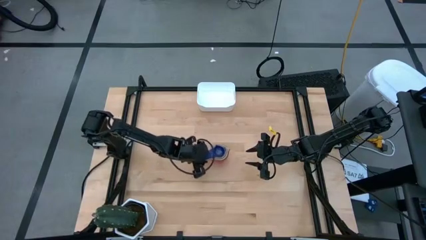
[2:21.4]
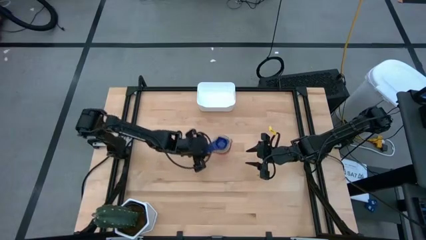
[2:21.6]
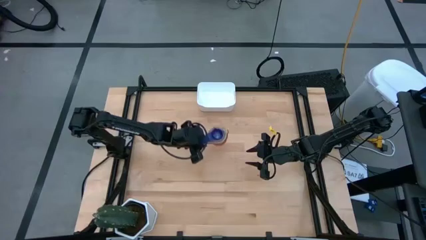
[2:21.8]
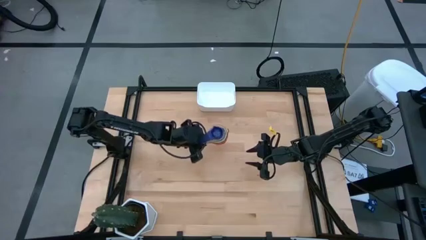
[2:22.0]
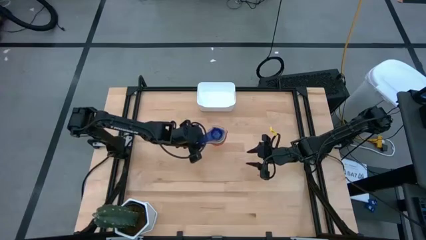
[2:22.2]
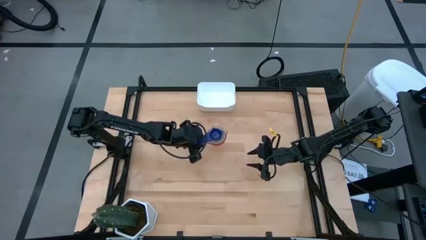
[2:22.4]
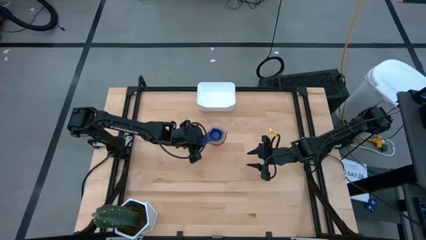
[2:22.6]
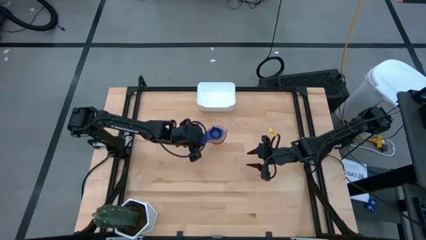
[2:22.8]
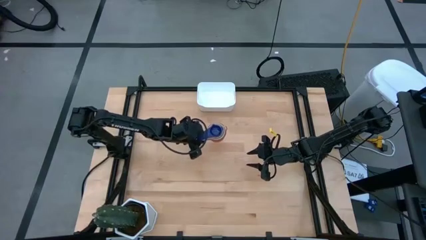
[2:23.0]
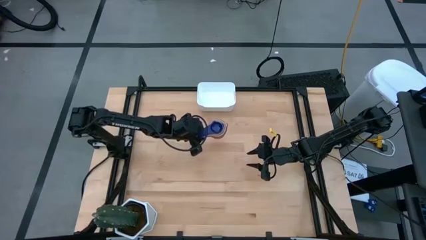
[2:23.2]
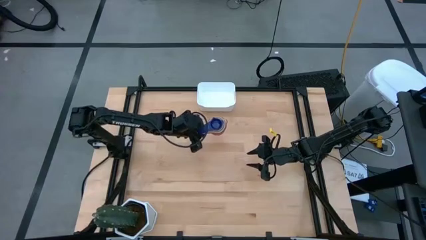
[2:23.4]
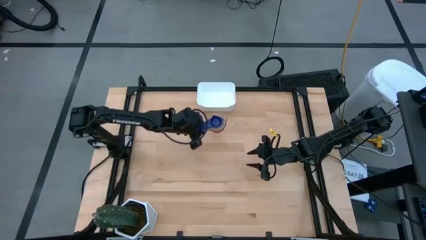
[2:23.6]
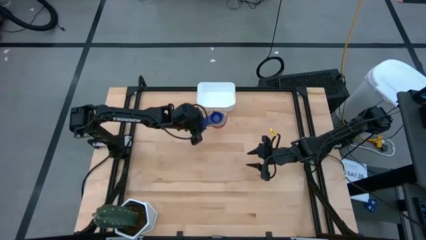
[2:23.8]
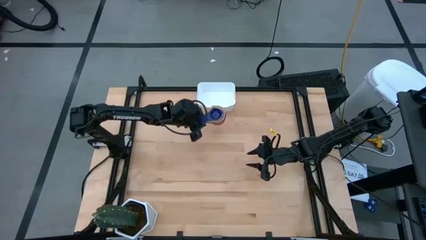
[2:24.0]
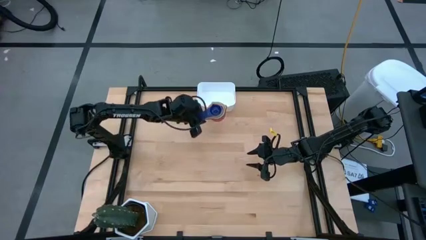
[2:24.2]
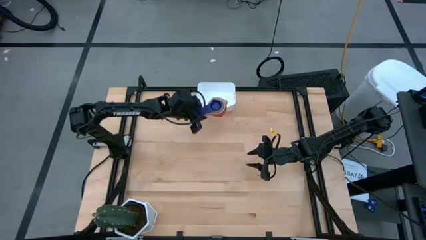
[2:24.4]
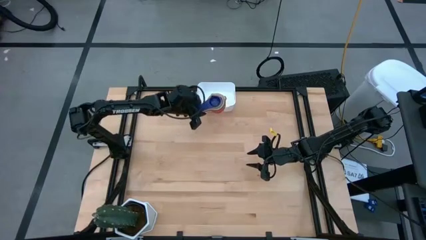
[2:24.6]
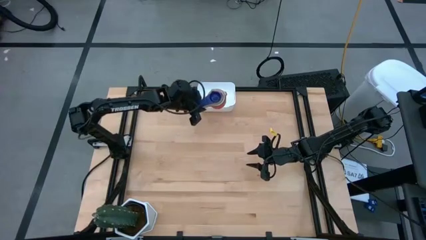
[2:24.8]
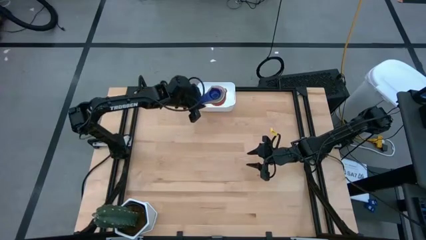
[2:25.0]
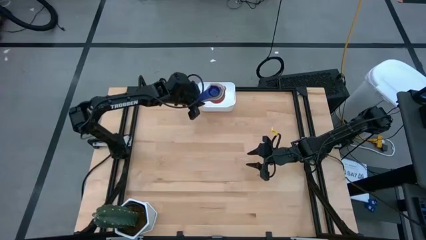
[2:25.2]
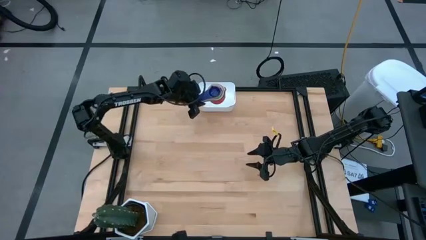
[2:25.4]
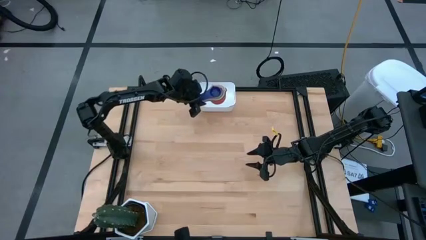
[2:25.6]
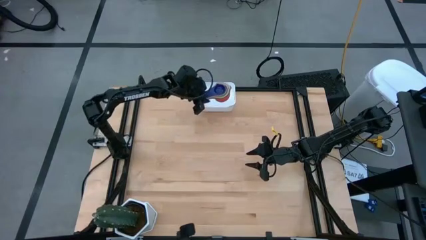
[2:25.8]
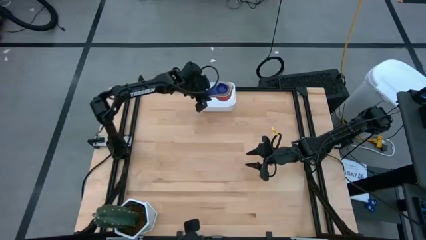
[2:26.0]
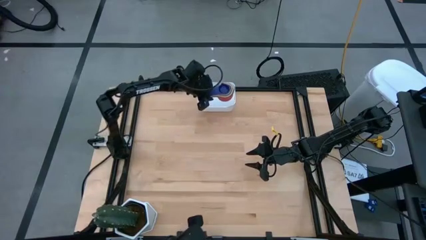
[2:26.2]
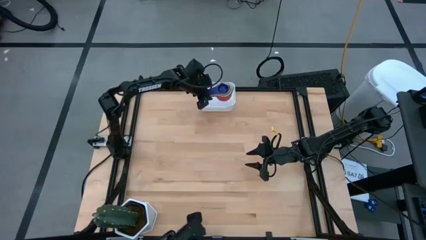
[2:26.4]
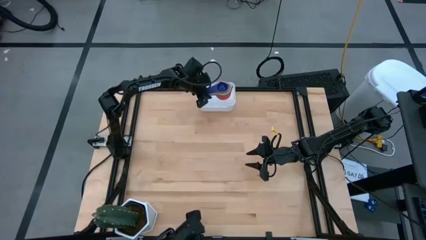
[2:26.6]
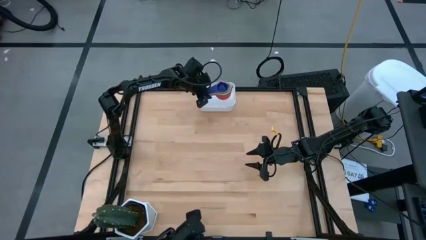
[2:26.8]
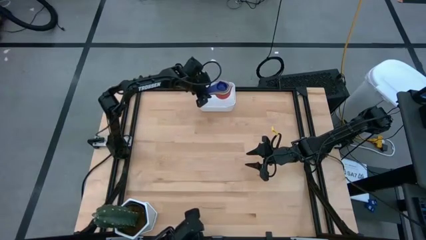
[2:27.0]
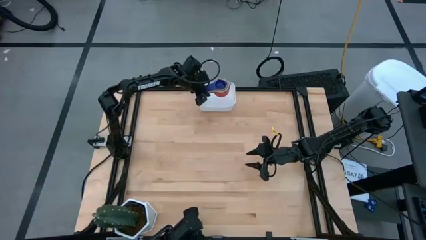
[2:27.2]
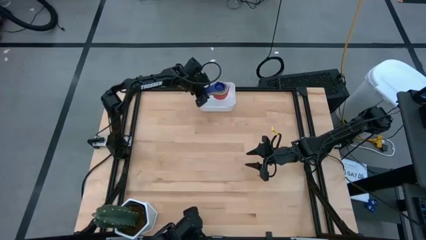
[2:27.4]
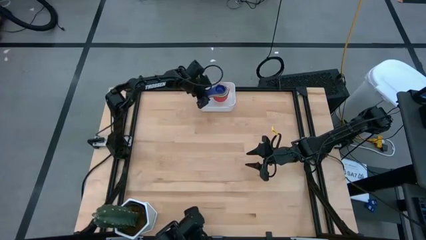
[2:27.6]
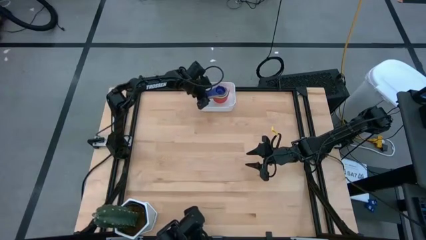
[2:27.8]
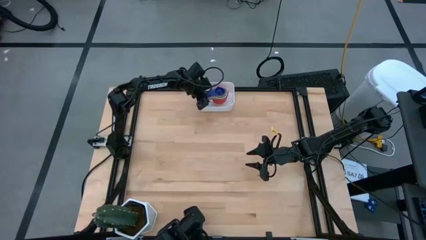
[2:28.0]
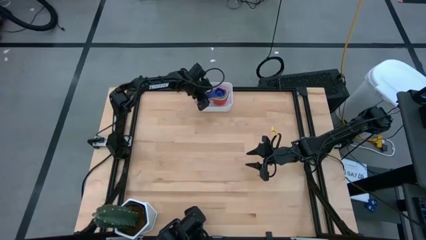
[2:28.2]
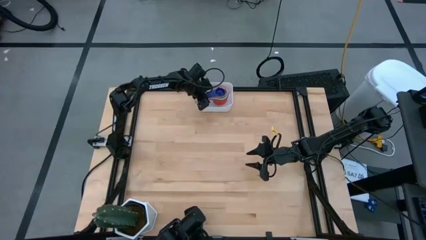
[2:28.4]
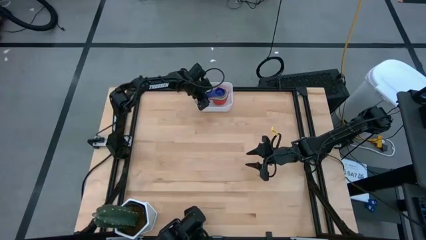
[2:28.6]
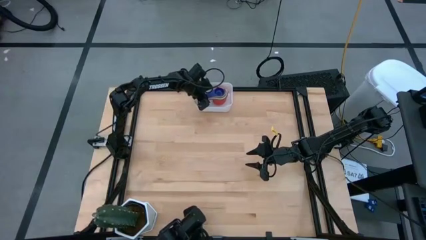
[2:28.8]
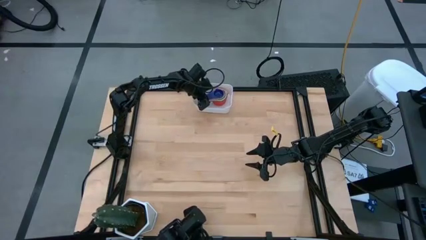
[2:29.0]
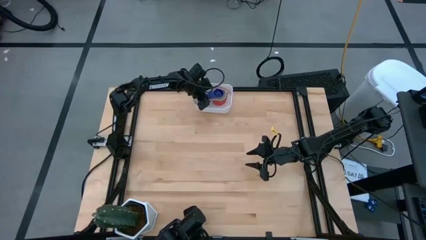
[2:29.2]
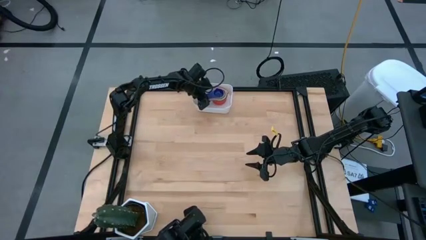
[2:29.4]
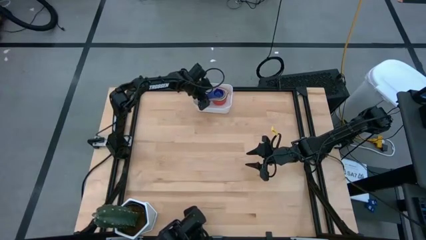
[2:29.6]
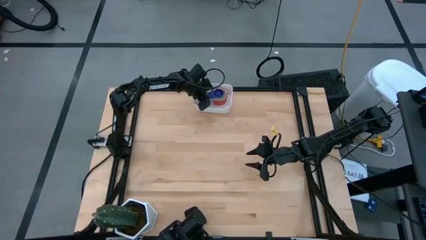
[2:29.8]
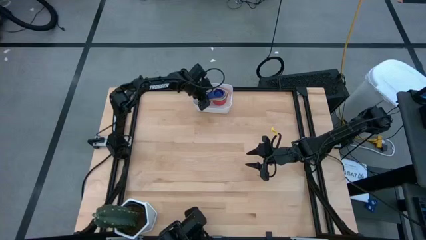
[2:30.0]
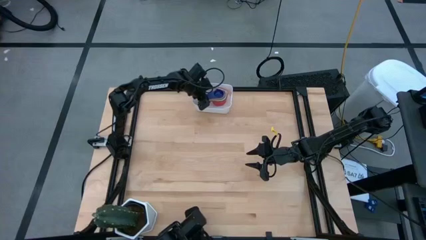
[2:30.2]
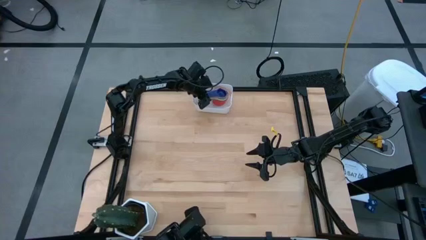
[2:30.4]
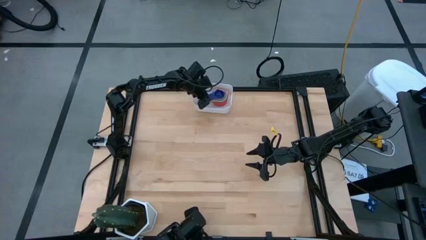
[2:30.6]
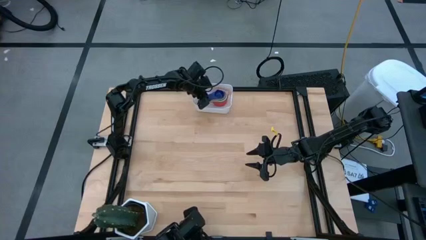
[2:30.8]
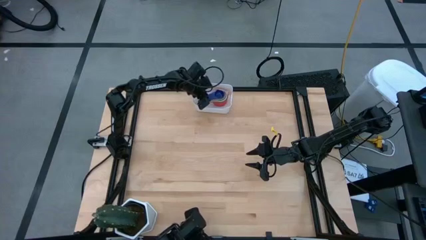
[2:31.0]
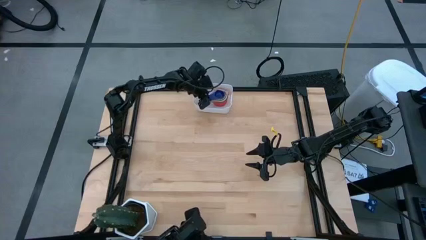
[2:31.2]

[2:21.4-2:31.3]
Task: Nest measuring cups in basket
Put the nested measuring cups into the white bin

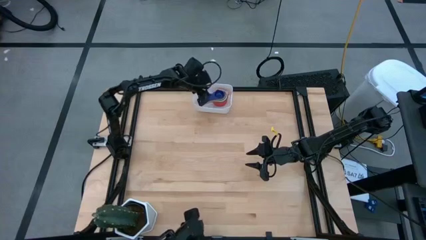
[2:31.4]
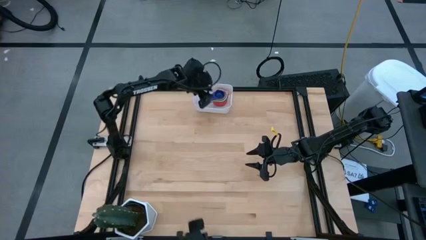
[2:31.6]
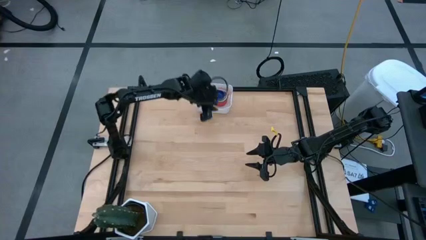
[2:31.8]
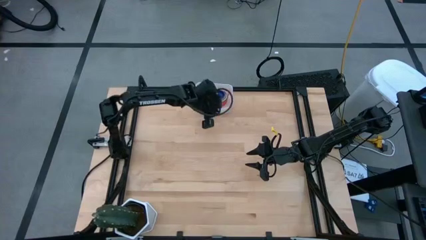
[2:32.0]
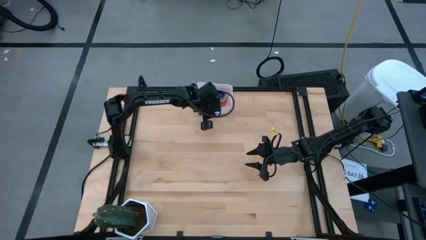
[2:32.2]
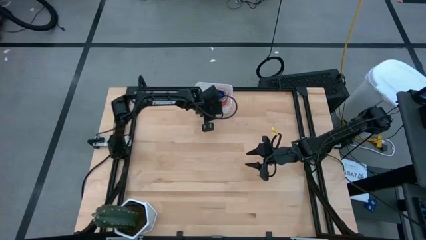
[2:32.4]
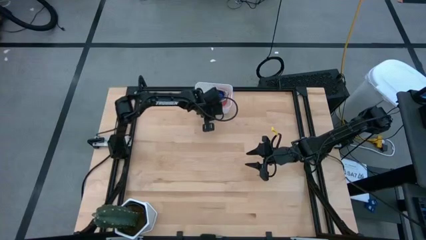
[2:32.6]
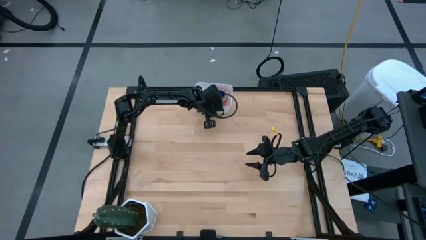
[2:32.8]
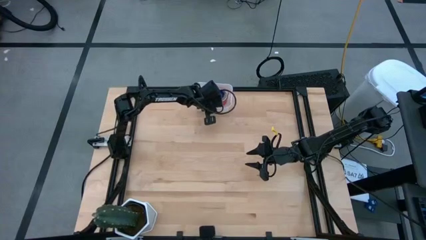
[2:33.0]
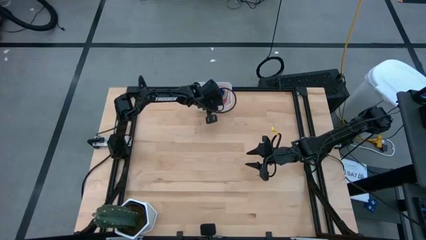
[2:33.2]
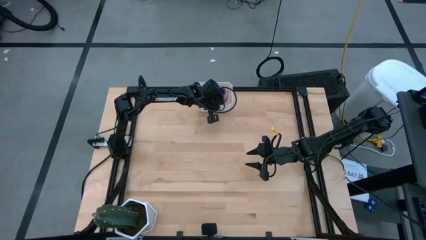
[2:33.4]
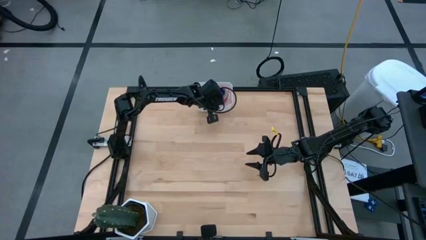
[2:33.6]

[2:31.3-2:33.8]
Adjust the white bin

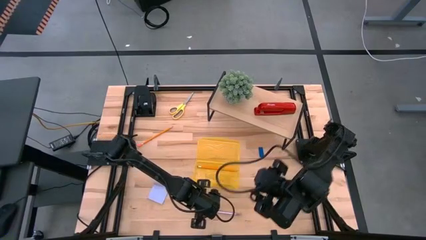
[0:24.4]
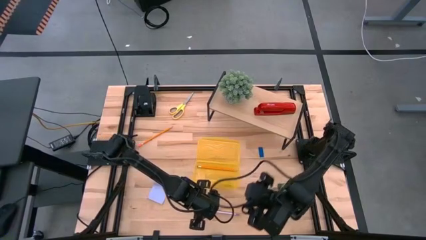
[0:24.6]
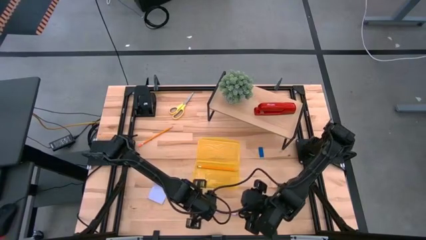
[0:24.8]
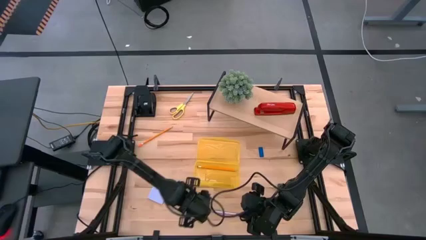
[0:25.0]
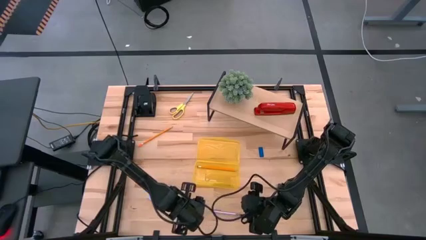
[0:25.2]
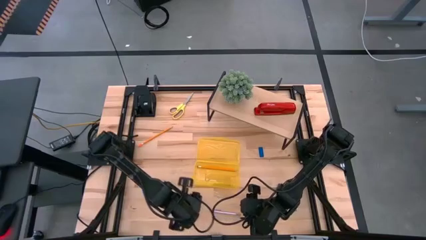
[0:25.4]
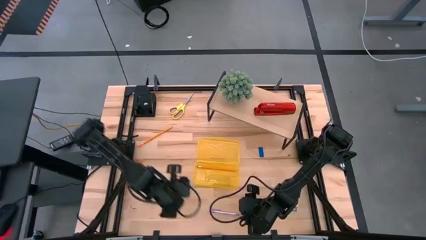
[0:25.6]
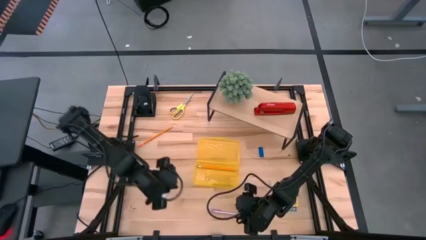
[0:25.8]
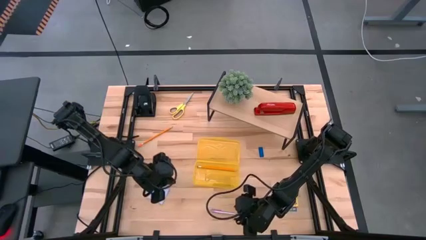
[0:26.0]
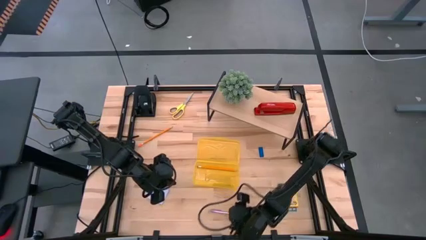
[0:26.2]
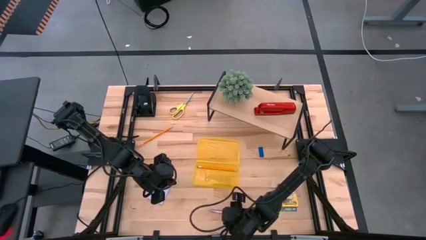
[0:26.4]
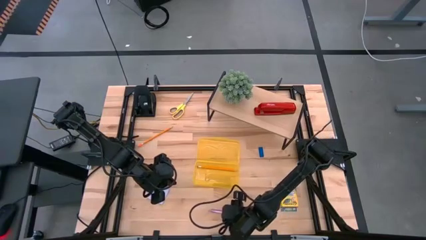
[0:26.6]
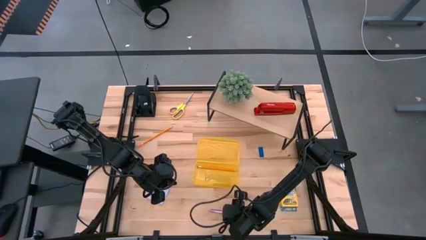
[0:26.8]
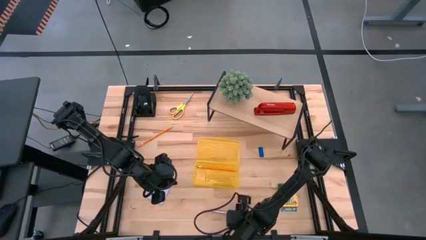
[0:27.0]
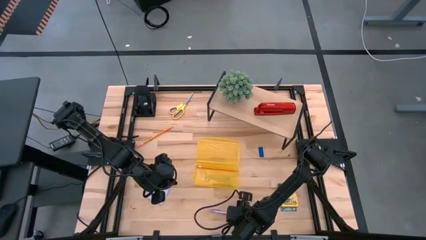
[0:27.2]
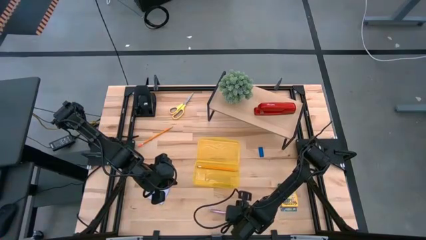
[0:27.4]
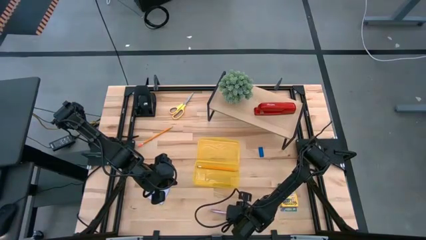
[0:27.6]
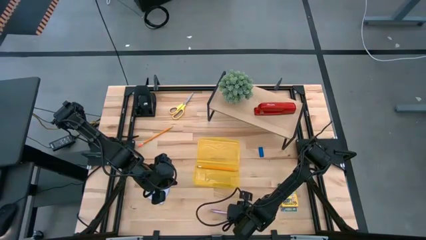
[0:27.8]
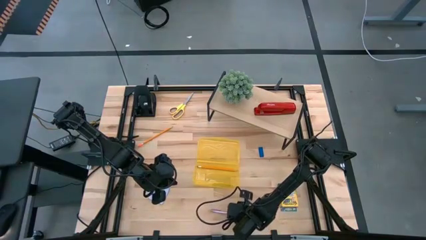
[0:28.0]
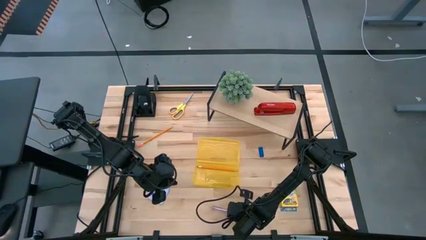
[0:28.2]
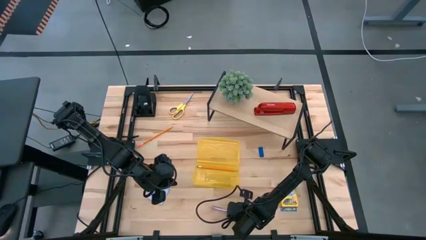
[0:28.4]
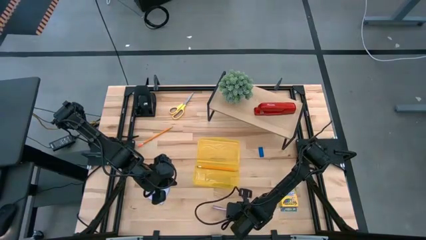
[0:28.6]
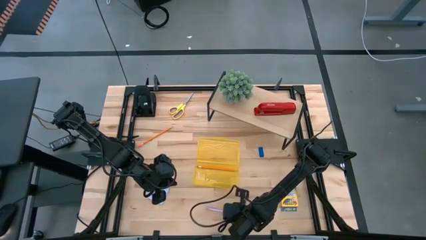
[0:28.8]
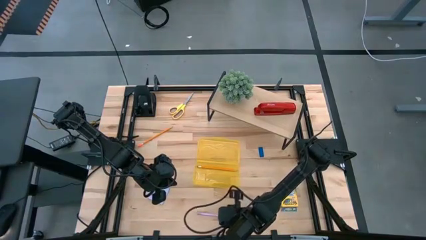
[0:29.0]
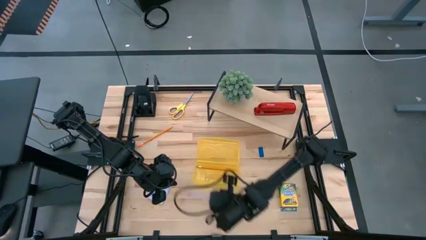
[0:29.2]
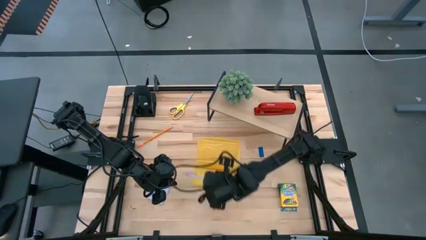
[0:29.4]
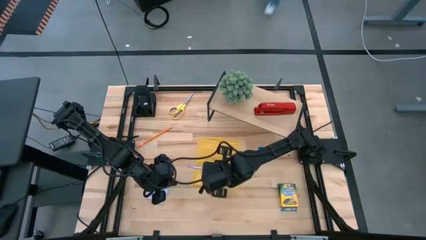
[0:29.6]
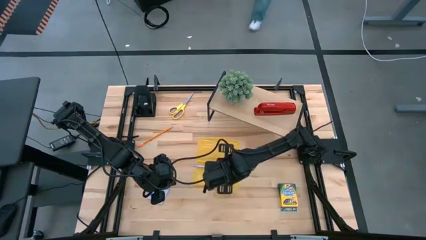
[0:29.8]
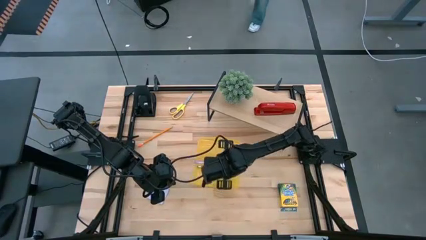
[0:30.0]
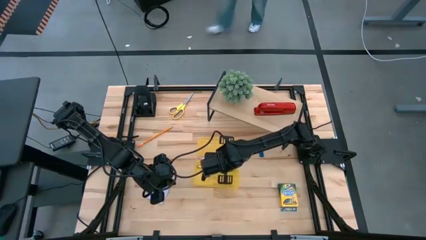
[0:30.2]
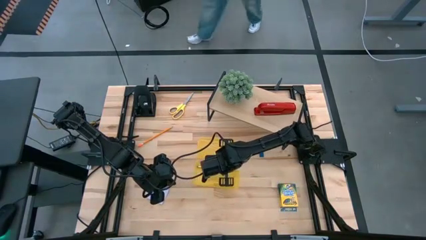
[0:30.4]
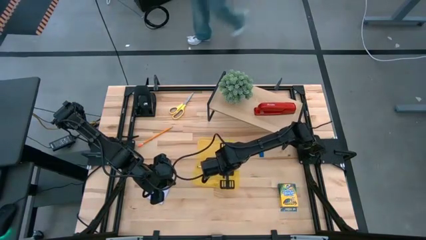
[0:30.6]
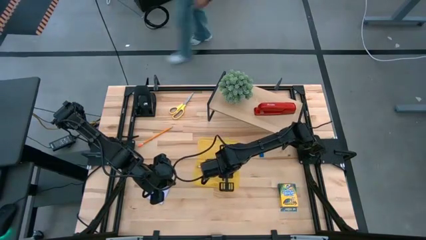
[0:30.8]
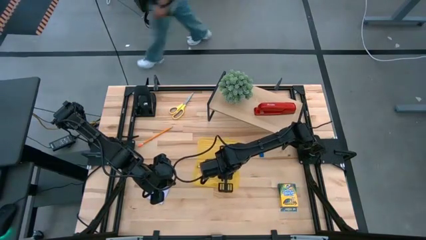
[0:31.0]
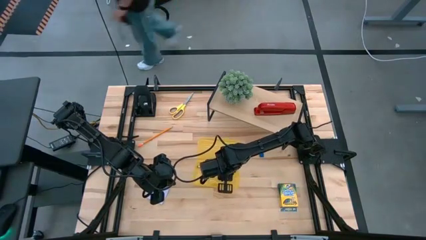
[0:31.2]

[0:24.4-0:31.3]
Task: Pack school essentials
Put the pen into the supply box
